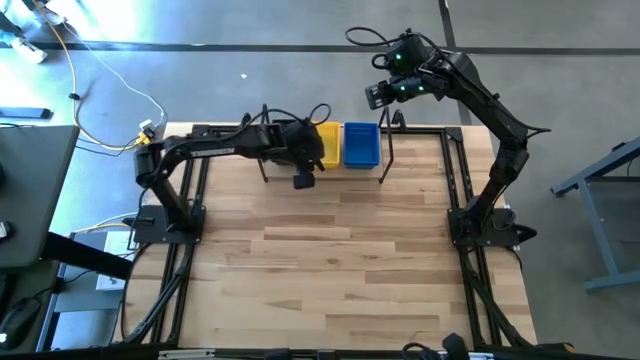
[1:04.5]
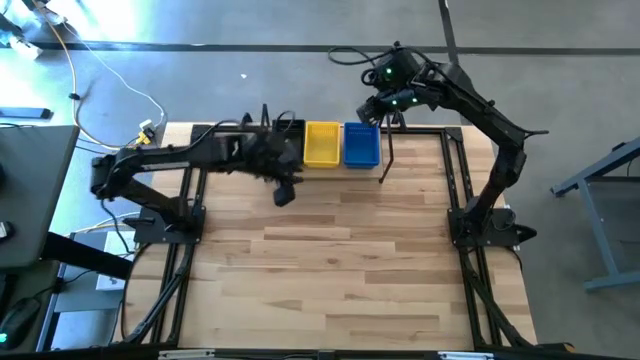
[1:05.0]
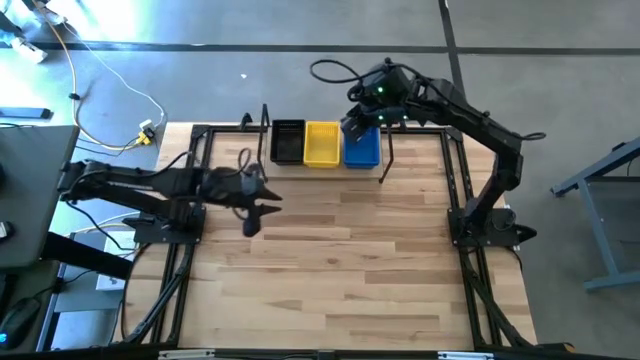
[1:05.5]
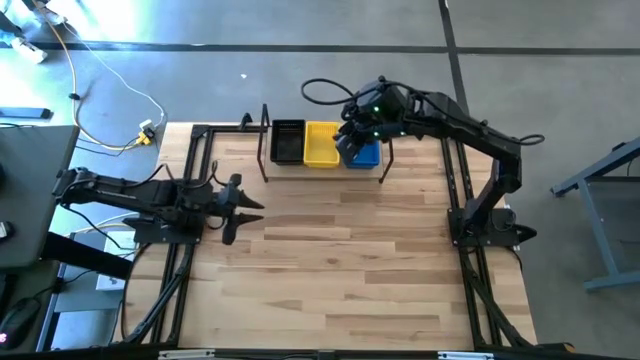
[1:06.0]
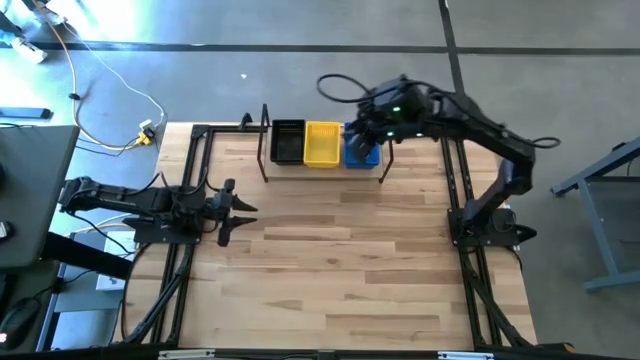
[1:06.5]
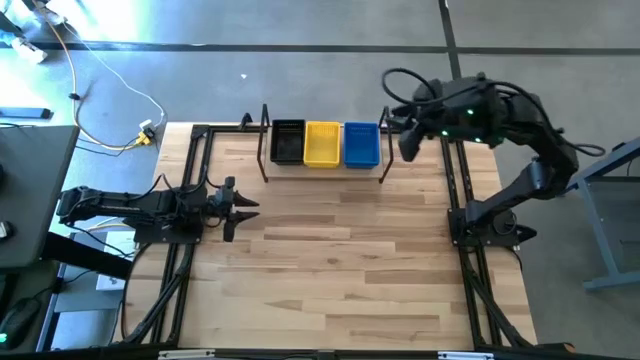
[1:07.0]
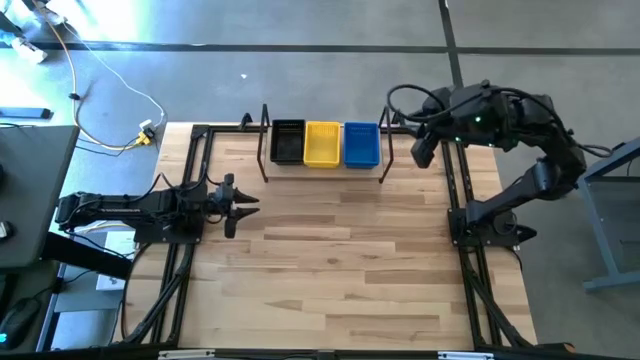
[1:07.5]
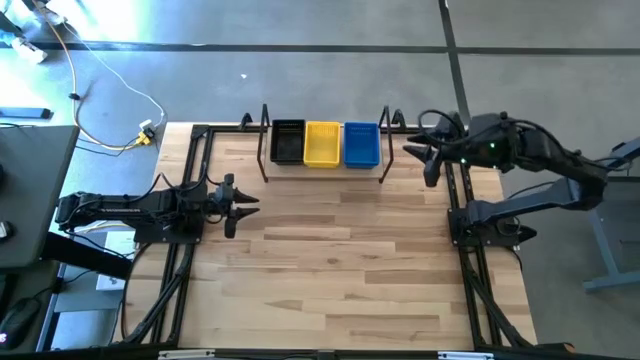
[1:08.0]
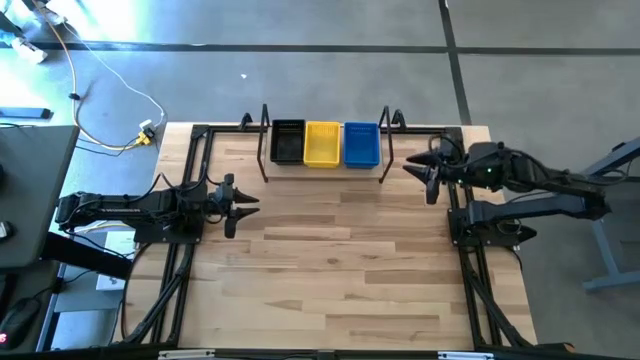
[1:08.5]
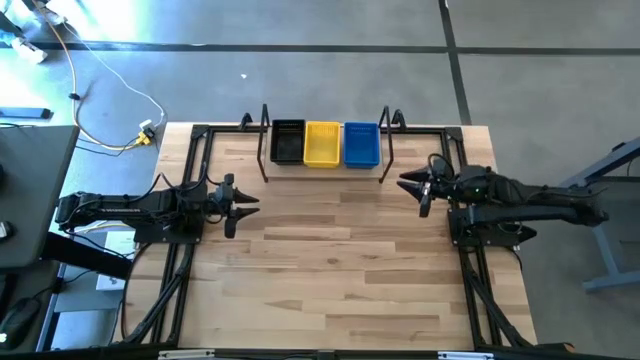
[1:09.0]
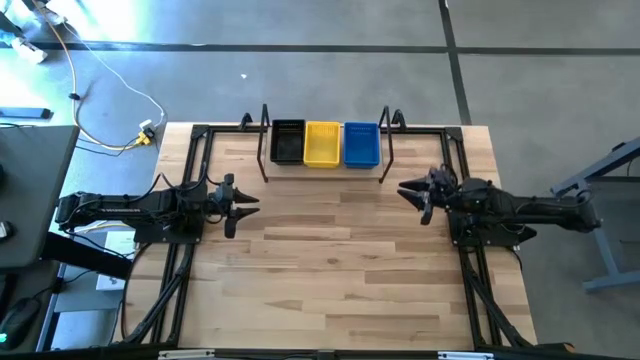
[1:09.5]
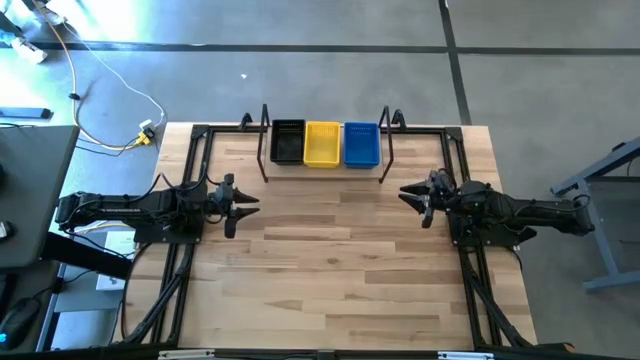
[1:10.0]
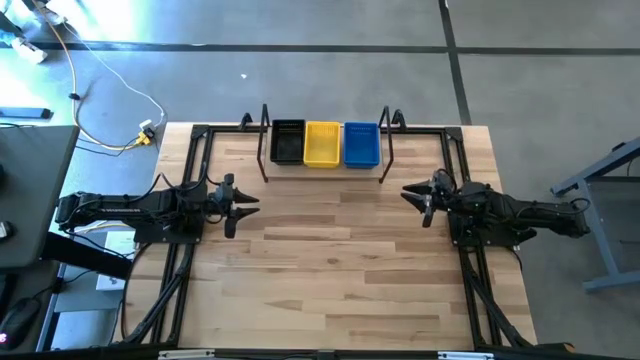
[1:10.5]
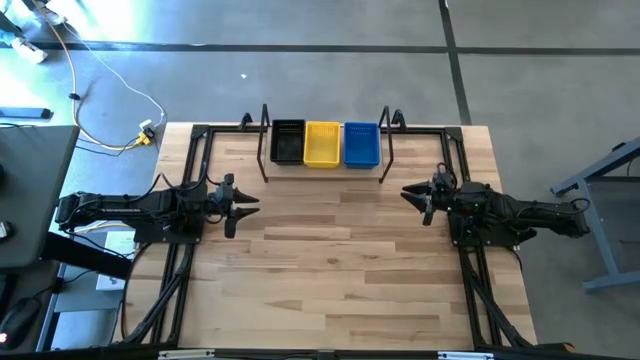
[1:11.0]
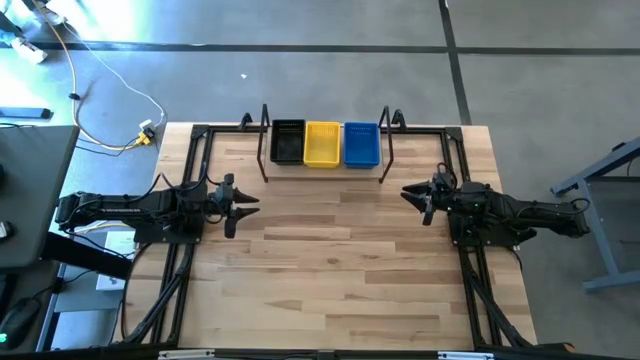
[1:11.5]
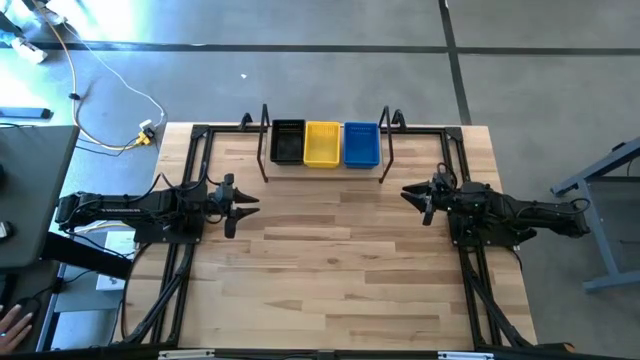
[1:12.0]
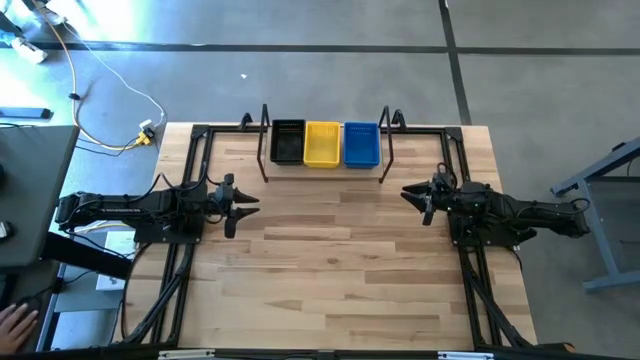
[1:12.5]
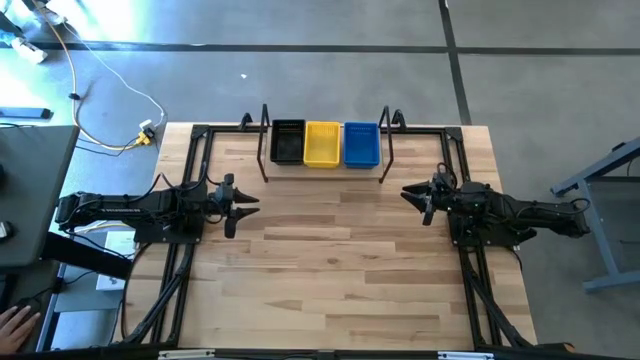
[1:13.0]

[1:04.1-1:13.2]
Task: Stack baskets on shelf by color
Return to Home Position

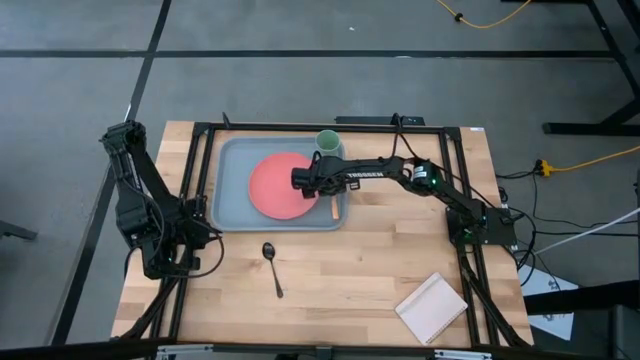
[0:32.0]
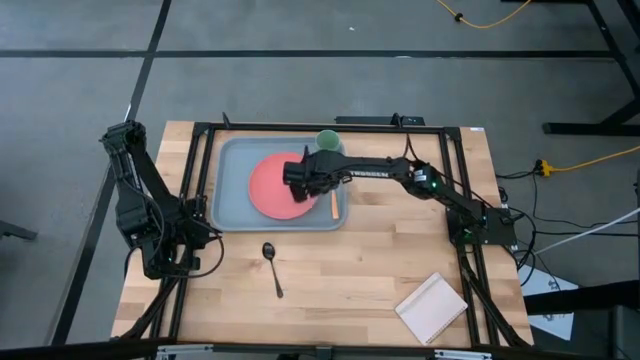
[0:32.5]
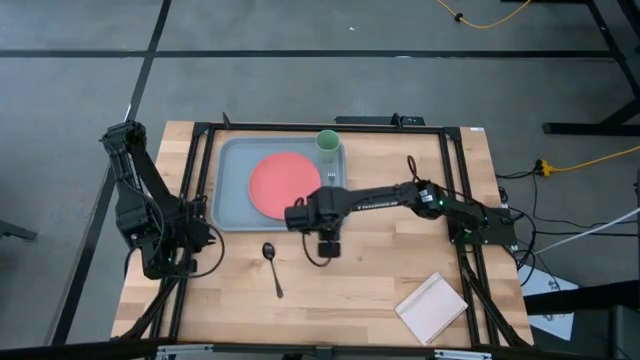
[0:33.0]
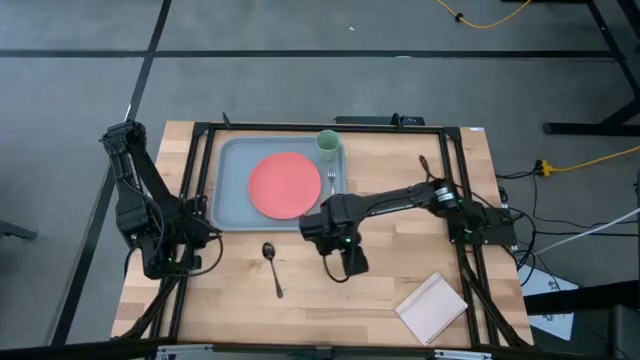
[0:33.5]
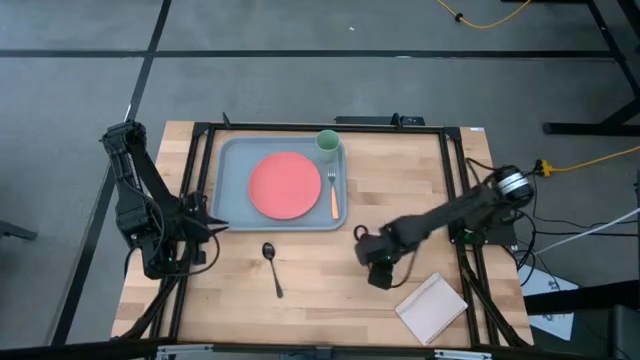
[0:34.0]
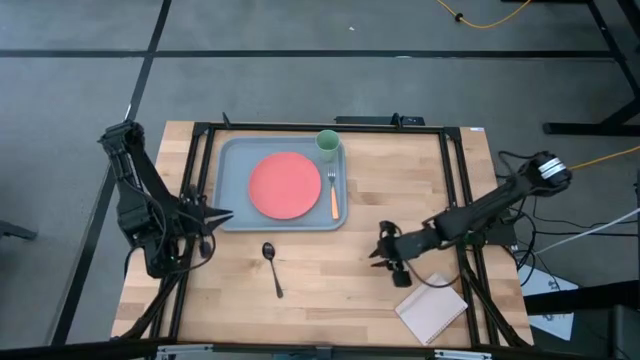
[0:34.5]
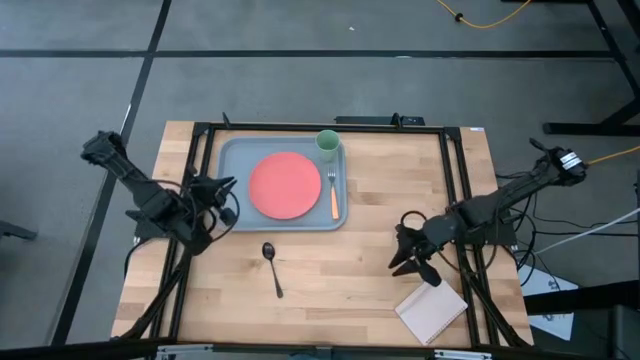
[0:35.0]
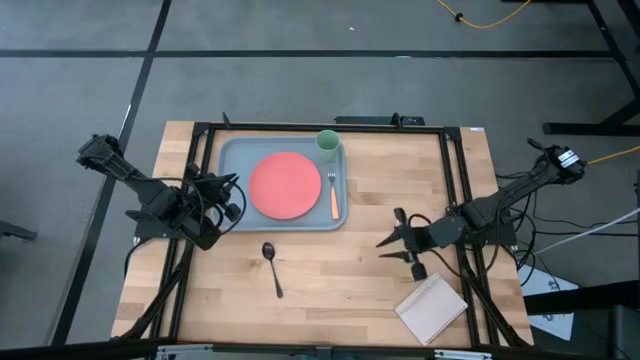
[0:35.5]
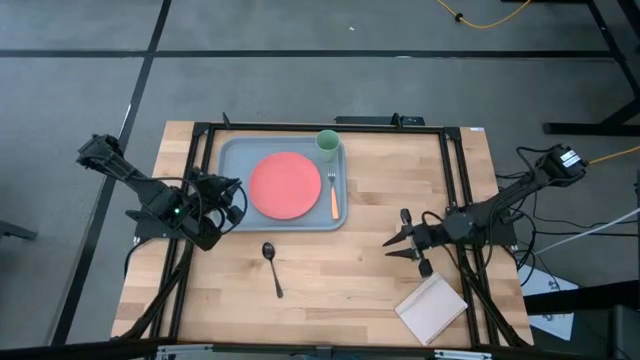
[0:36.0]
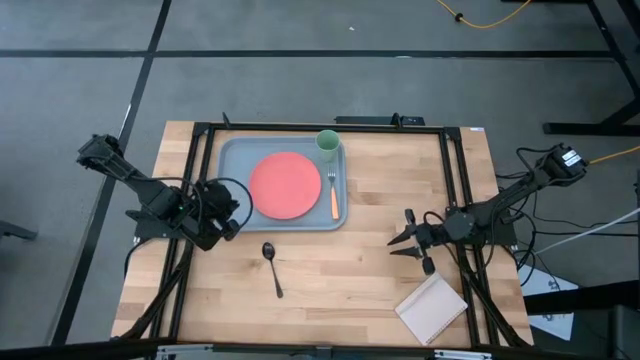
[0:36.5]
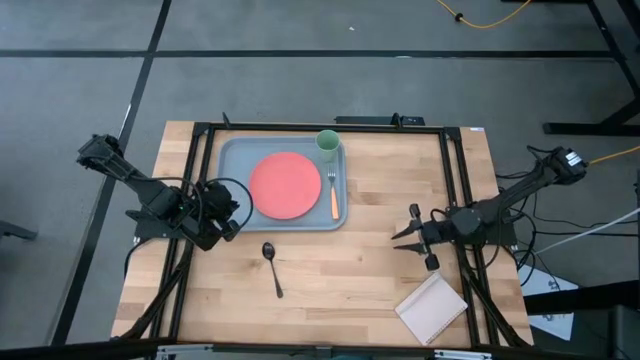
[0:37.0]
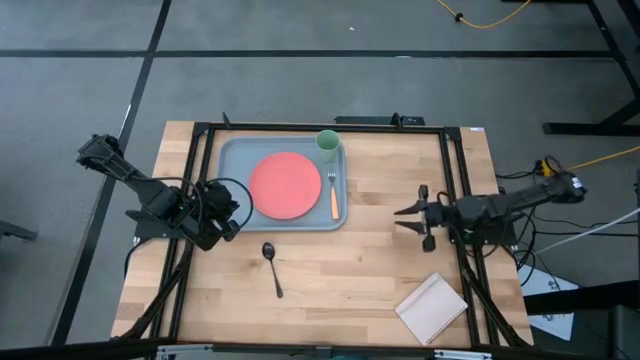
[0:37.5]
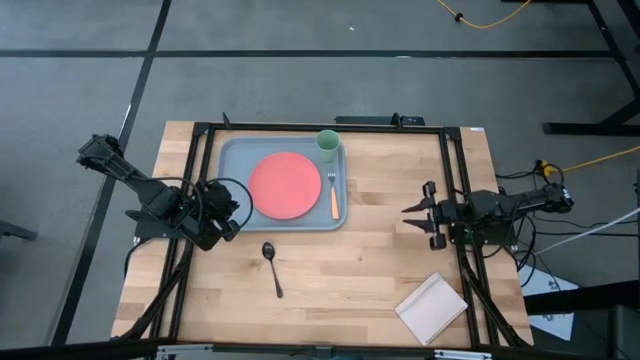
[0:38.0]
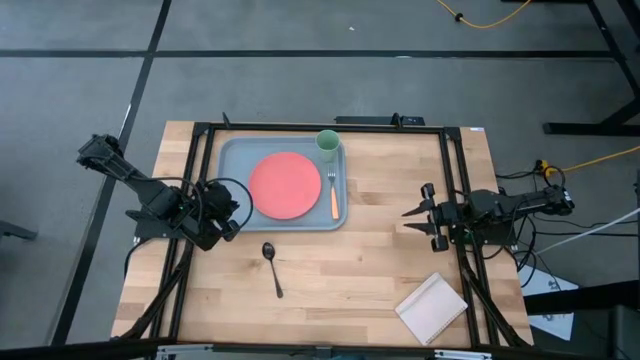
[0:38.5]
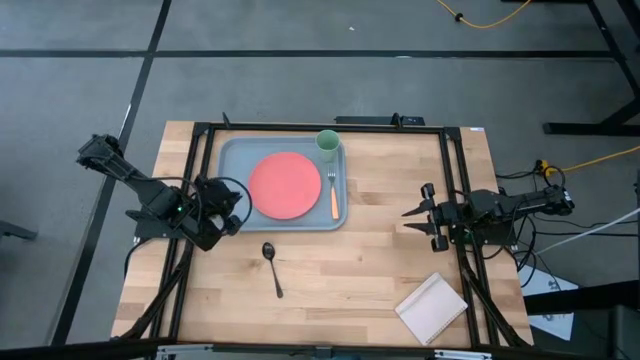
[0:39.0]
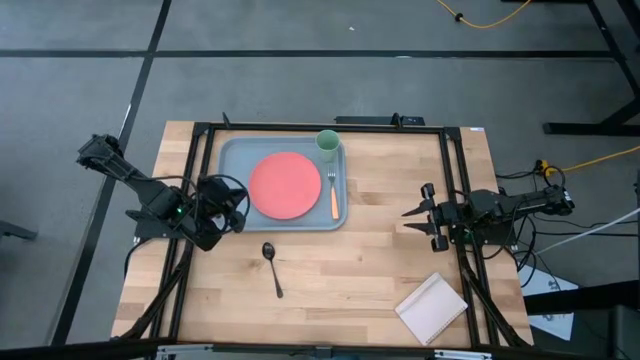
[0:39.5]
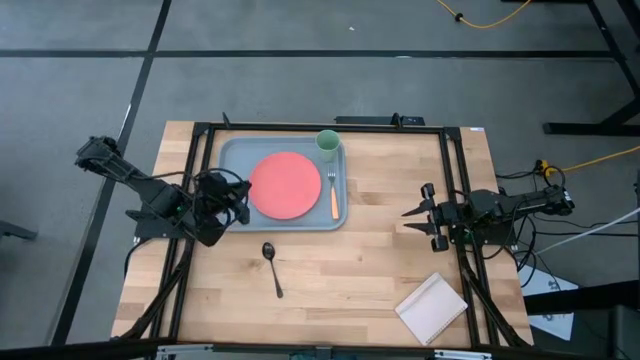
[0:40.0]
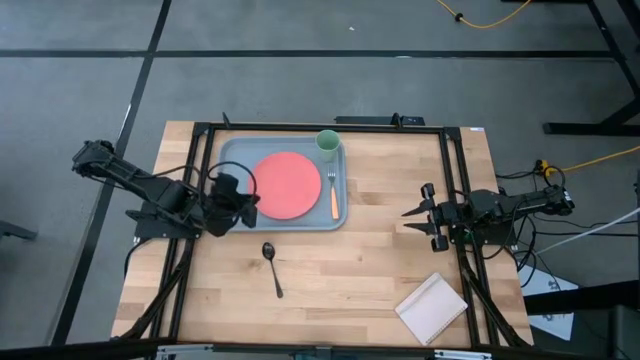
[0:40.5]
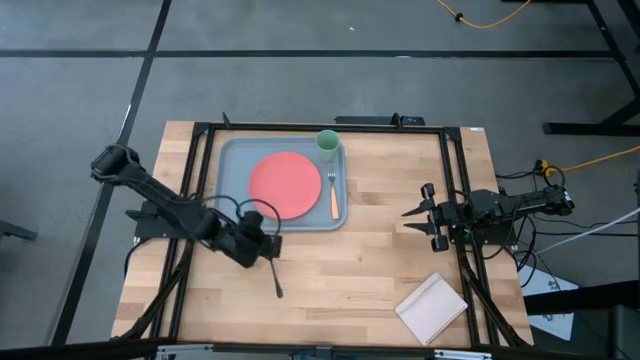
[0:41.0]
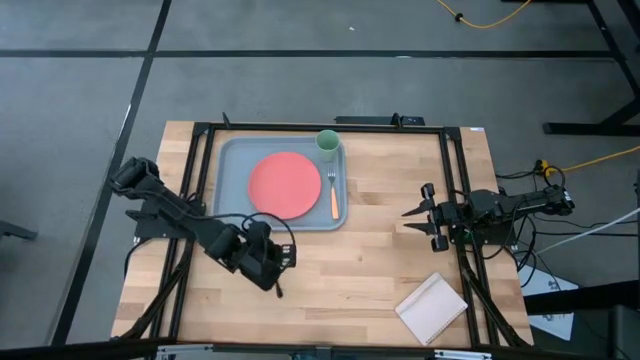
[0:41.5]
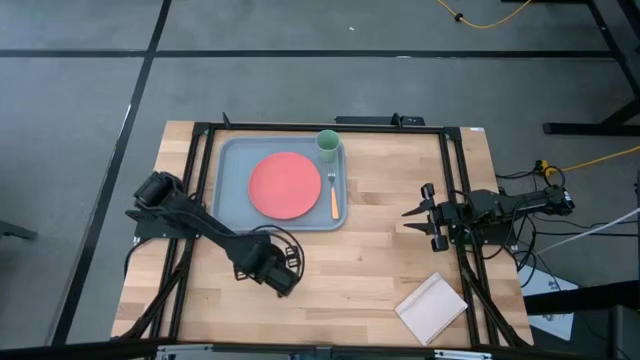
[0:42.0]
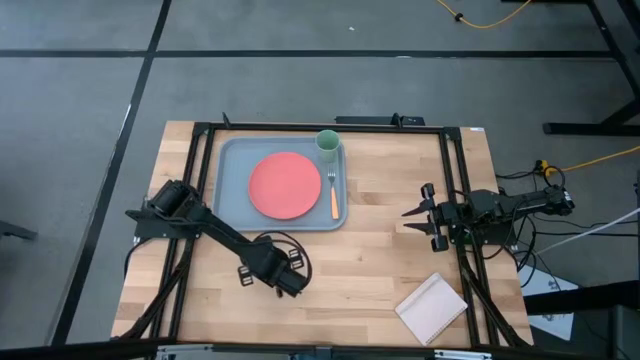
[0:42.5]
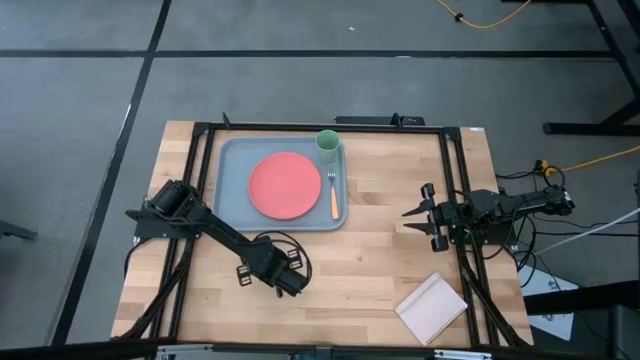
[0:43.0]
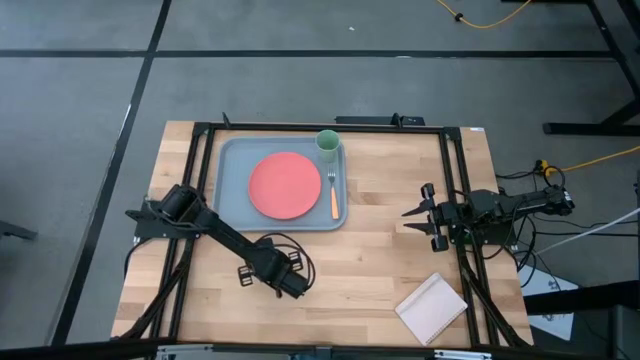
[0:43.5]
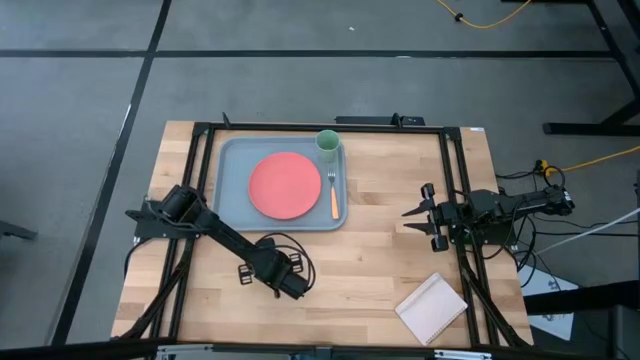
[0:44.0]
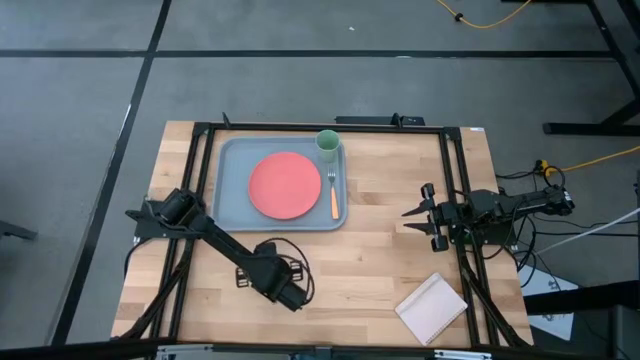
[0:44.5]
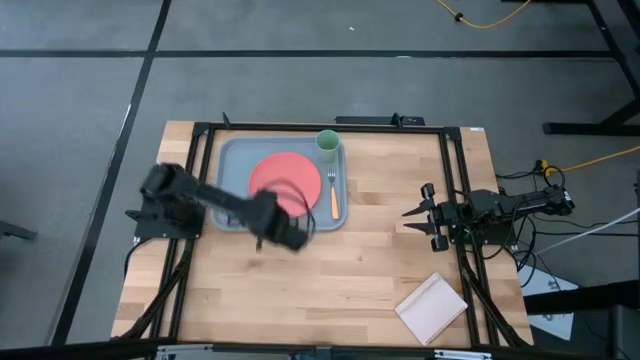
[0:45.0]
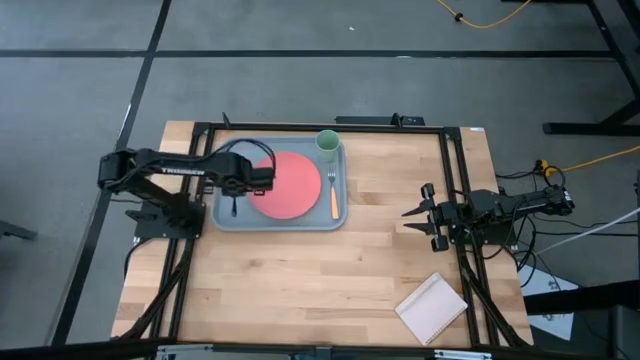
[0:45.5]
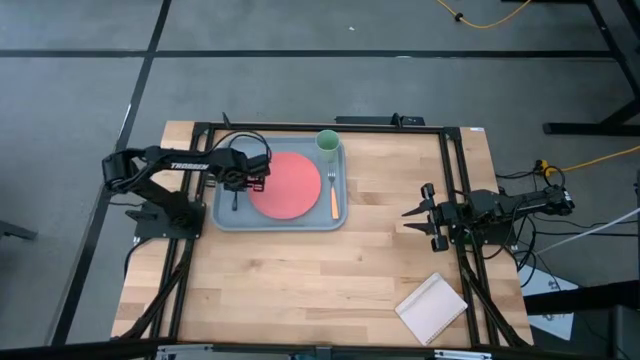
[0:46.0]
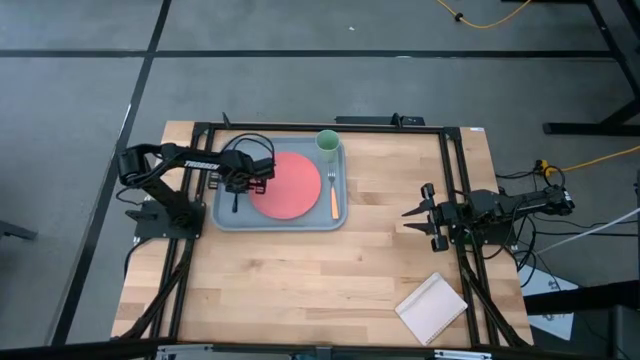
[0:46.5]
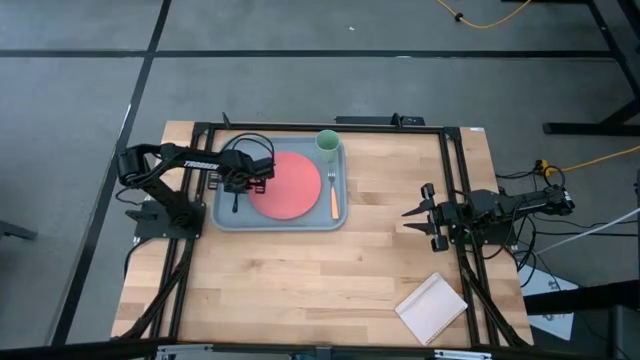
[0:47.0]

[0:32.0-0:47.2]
Task: Pick and place plate/cup/fork/spoon on tray
Put the black spoon on the gray tray to the left of the light pink plate
